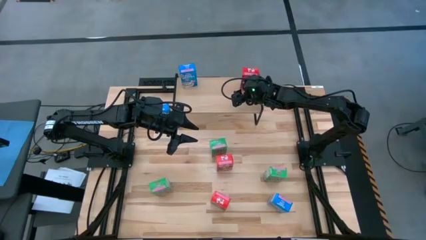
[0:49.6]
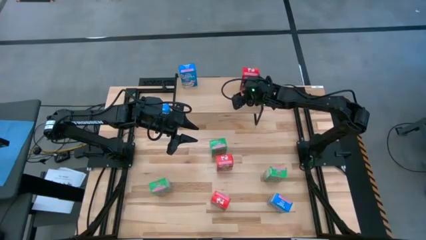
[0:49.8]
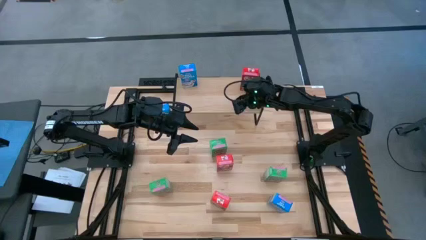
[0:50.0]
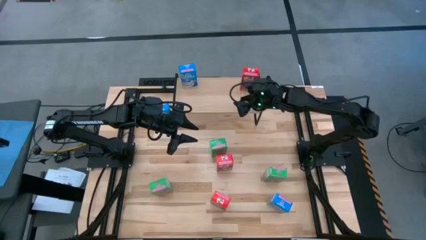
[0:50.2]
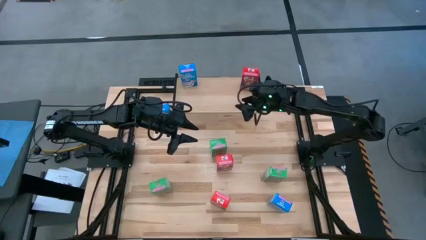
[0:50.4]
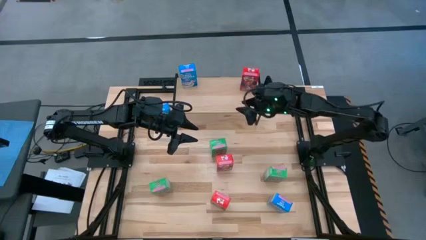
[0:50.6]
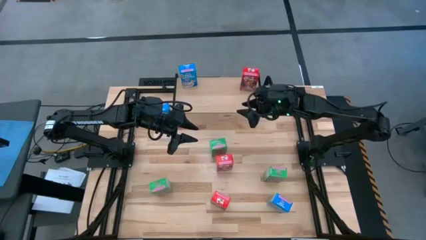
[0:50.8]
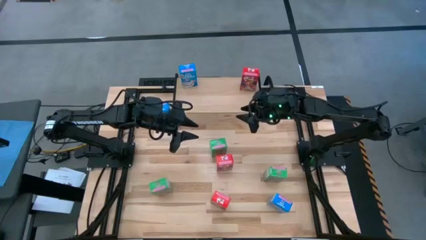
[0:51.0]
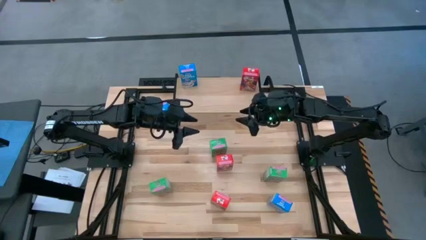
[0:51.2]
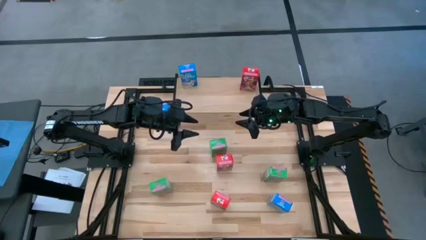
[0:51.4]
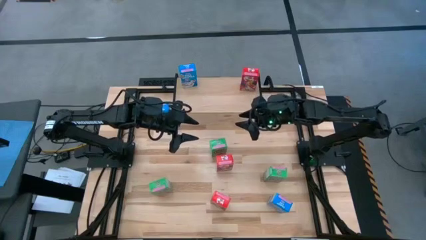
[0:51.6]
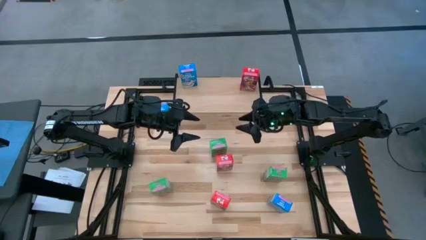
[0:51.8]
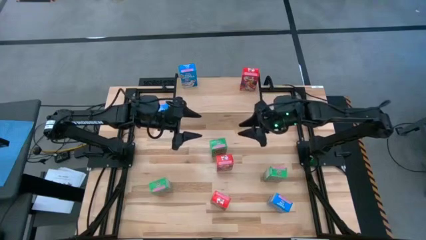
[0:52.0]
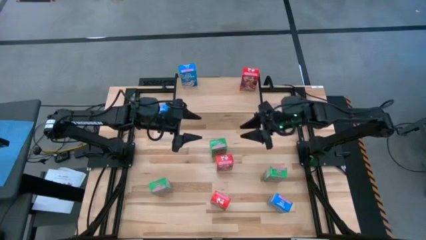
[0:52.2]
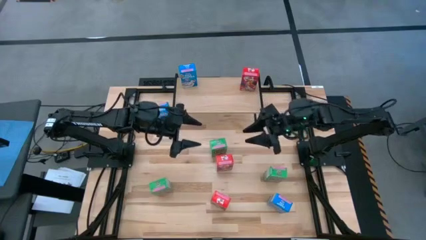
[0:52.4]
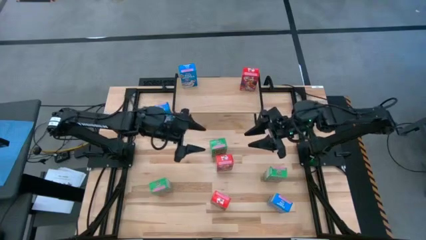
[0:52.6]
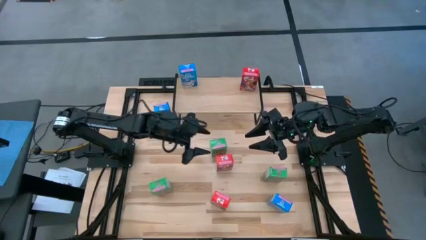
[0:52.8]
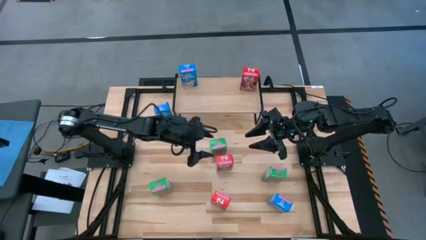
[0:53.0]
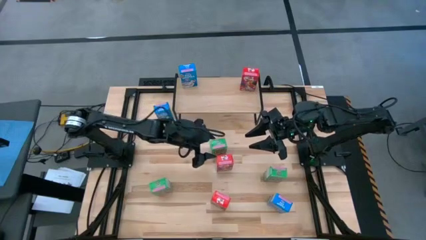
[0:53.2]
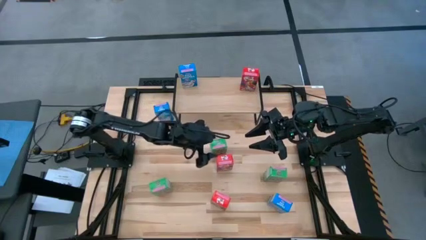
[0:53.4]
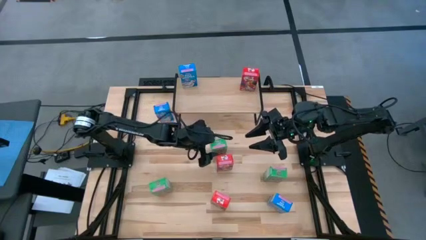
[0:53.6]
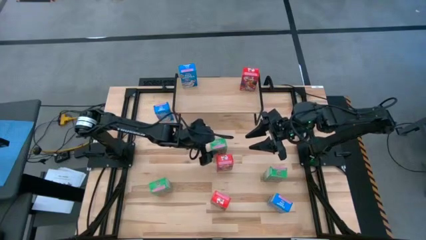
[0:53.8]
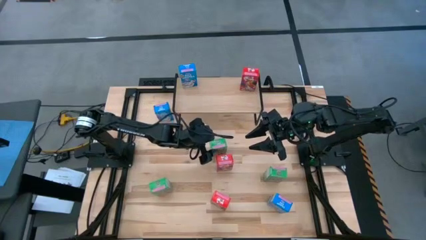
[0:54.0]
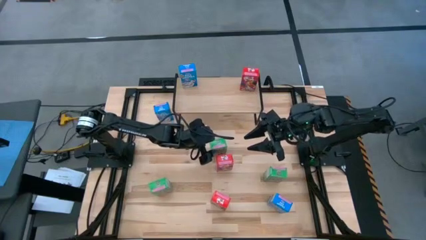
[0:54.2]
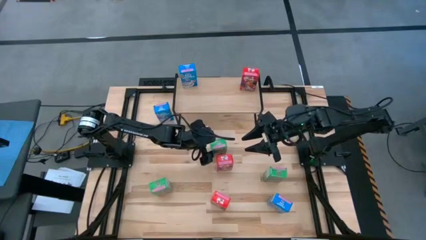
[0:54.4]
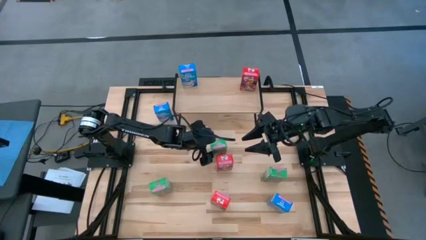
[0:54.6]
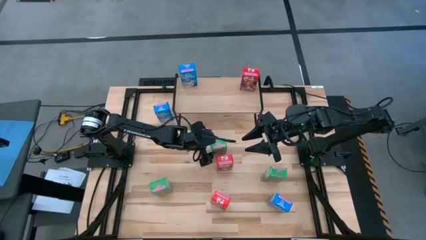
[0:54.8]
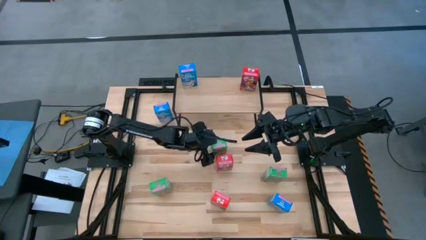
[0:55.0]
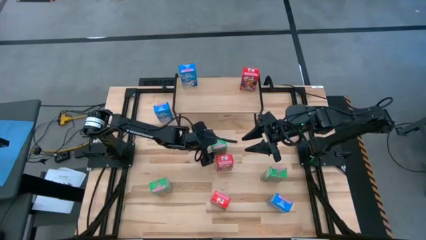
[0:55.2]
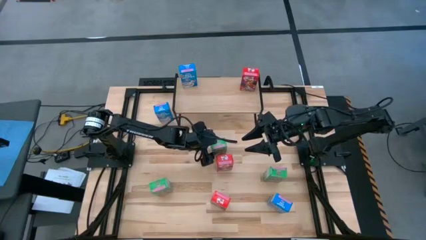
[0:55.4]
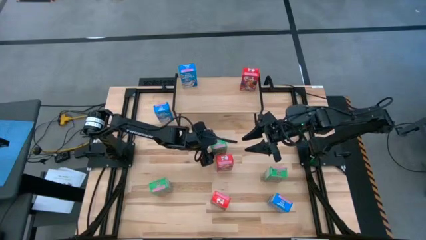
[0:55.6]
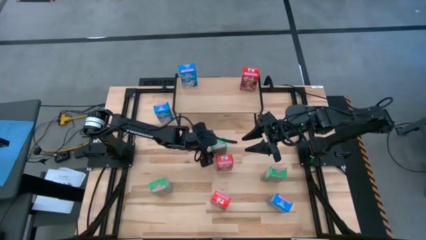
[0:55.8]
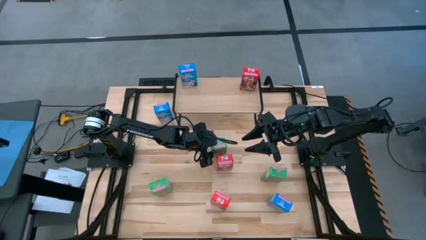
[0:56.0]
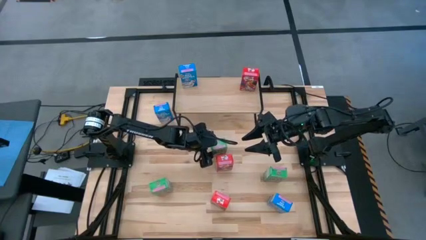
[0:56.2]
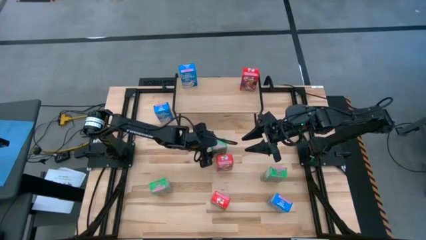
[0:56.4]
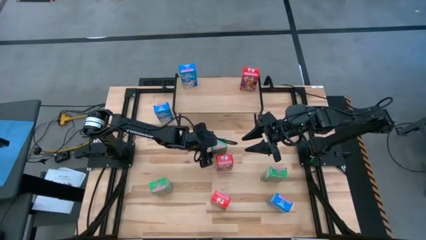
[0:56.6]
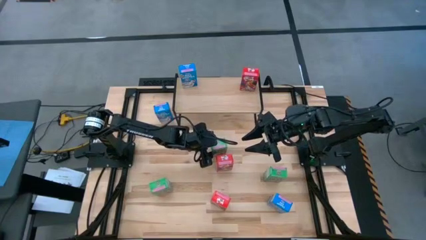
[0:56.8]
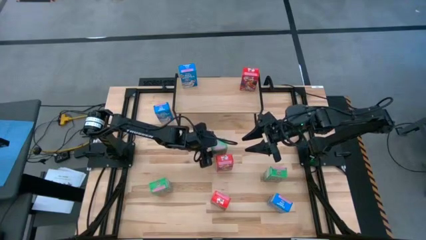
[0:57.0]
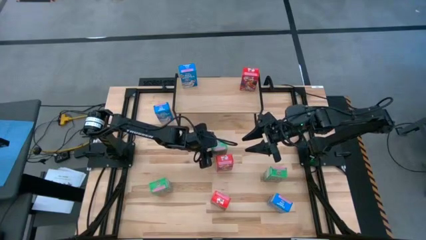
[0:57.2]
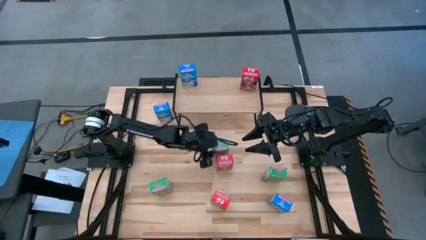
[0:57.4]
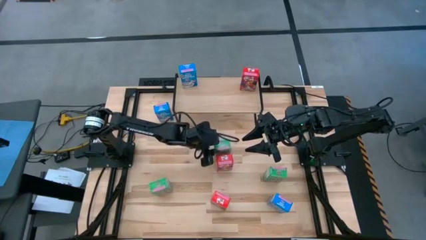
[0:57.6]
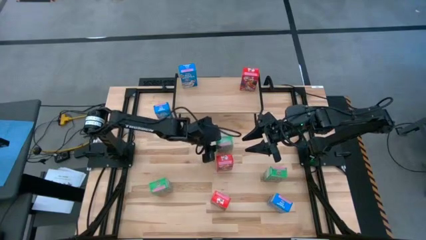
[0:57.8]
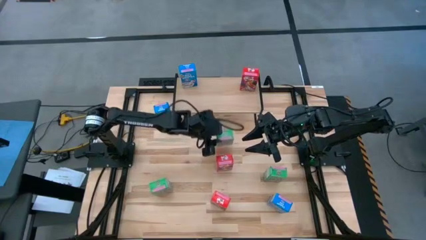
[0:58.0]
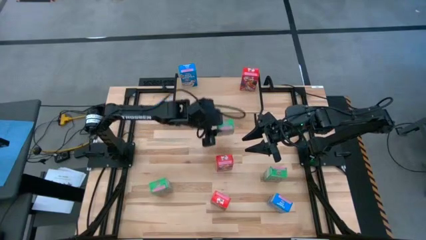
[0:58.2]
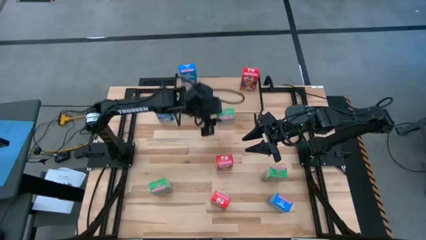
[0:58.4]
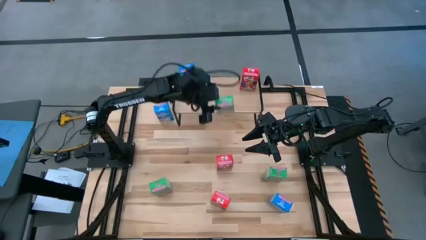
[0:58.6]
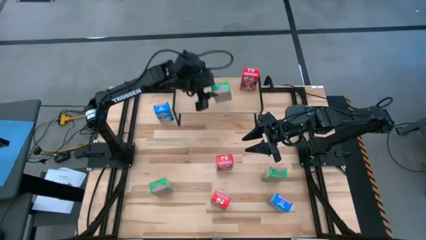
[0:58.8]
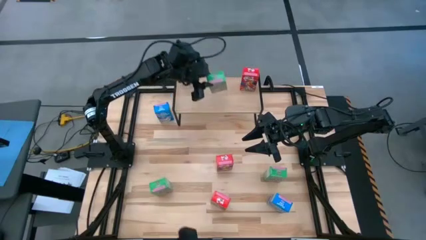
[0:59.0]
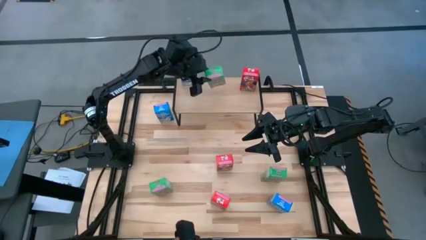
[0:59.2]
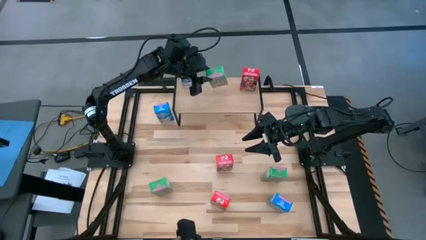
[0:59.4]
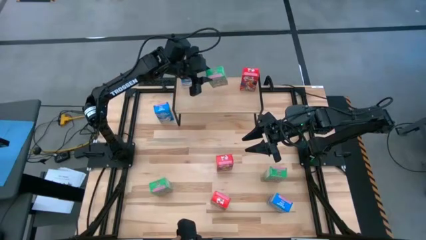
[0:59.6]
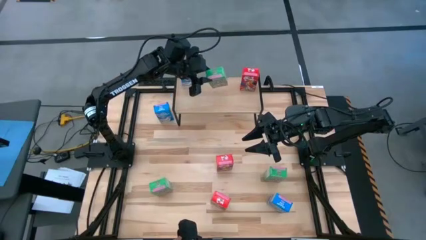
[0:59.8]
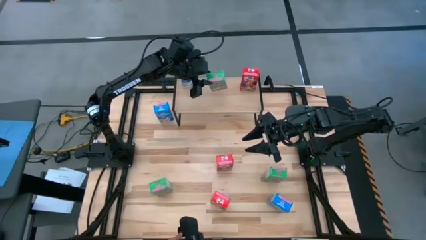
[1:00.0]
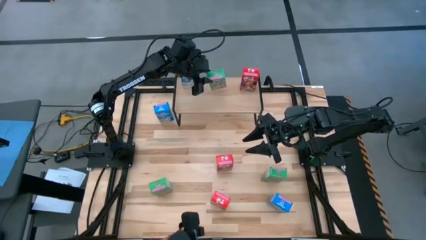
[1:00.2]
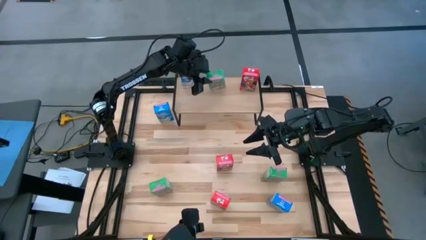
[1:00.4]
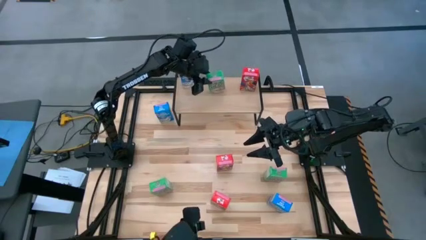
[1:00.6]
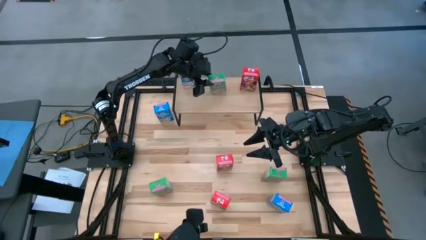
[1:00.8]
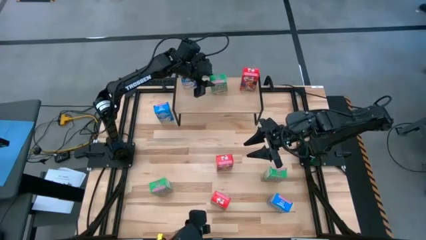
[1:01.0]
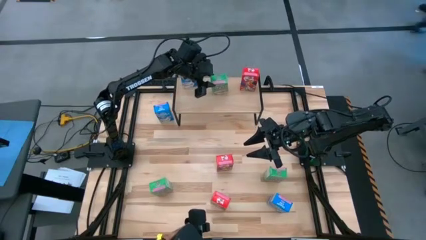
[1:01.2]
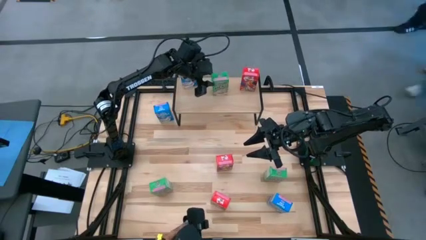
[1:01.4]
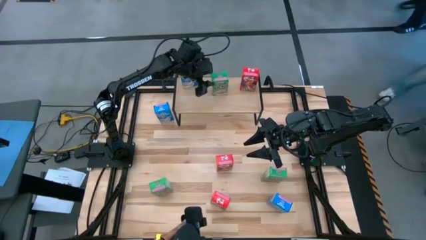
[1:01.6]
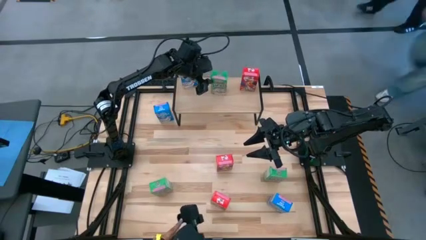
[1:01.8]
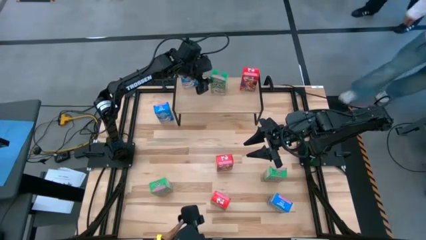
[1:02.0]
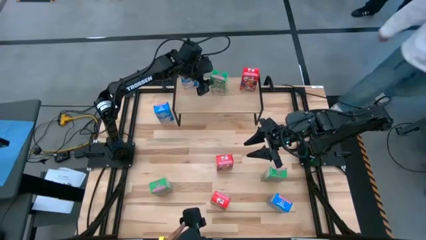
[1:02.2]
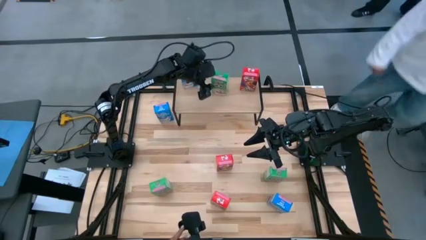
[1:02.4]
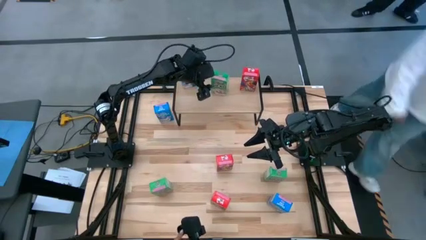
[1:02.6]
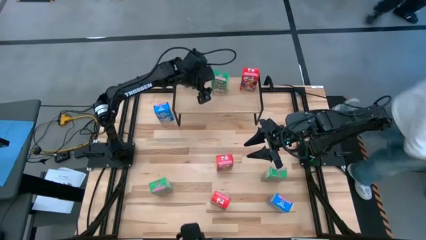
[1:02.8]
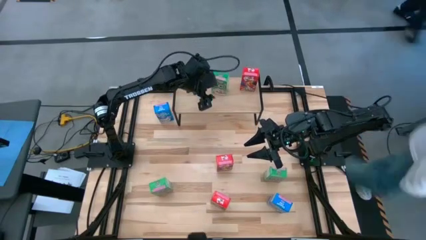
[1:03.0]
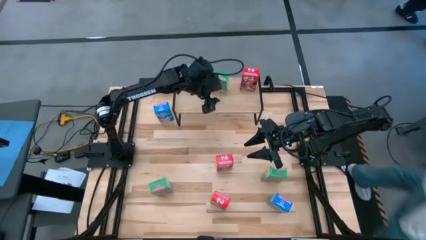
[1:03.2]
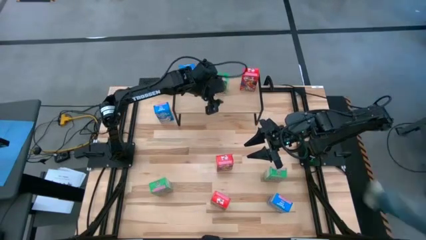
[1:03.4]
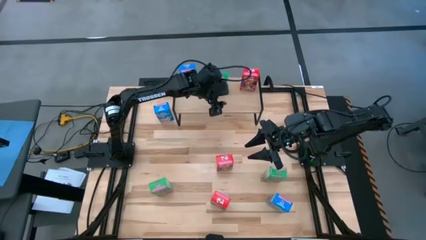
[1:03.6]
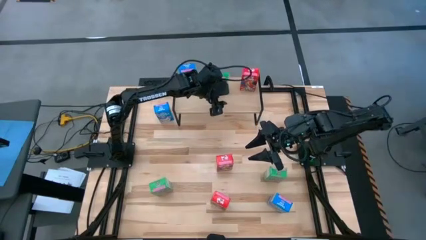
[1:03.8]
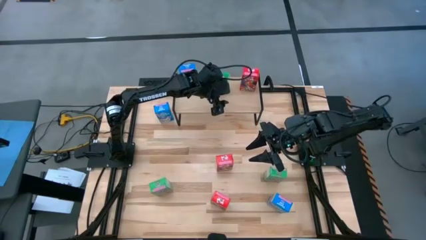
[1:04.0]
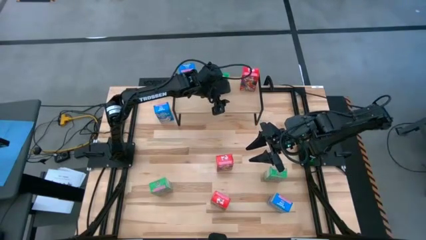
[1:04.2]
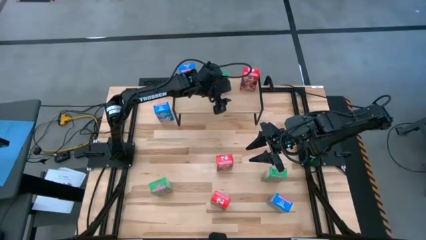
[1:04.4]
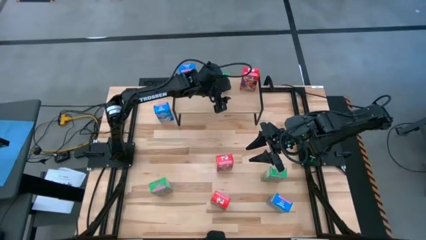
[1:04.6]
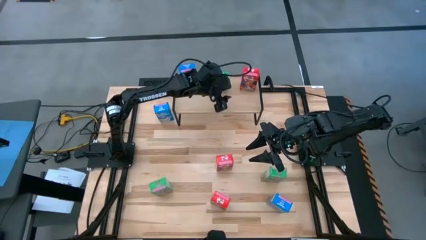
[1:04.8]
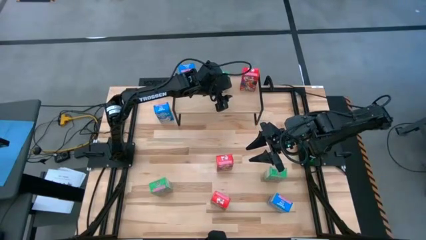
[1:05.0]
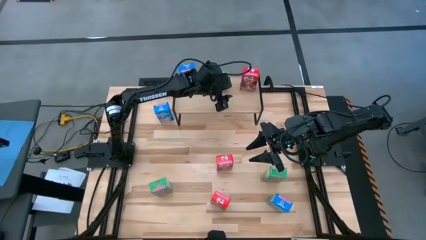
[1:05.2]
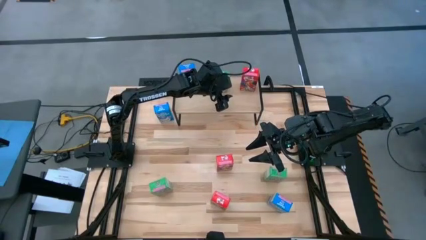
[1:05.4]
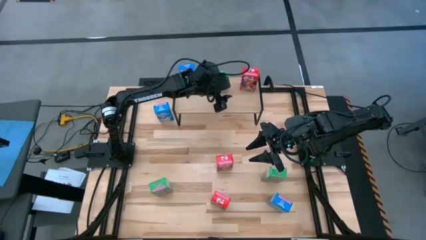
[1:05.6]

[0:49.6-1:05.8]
Task: Stack cereal on shelf
Put the top green cereal box on the shelf
